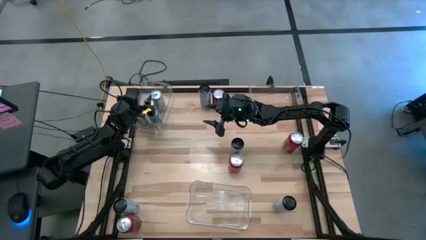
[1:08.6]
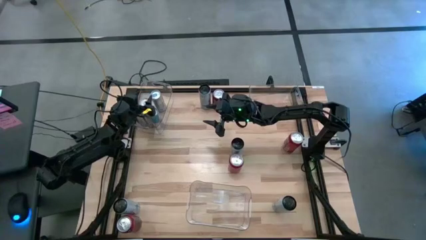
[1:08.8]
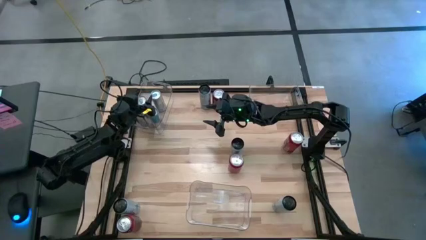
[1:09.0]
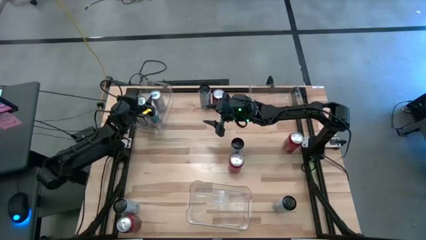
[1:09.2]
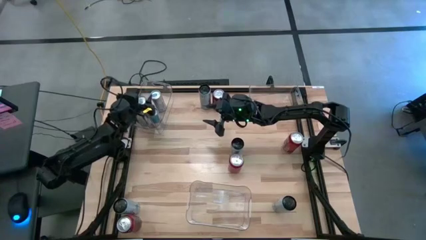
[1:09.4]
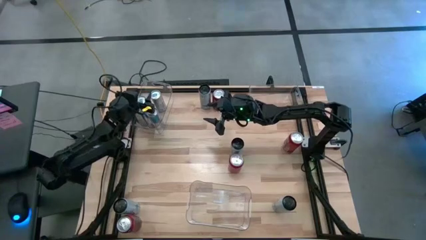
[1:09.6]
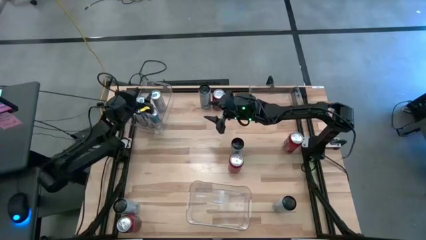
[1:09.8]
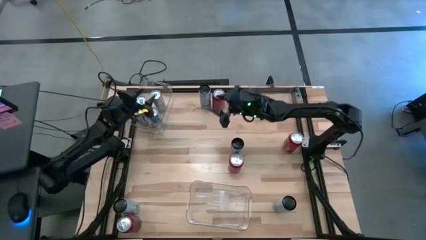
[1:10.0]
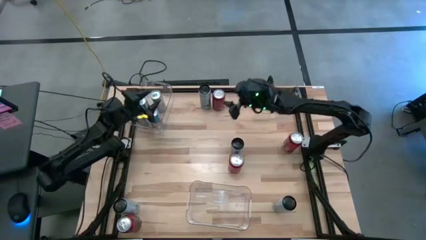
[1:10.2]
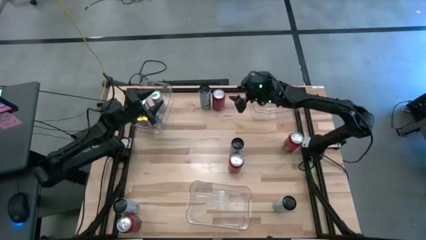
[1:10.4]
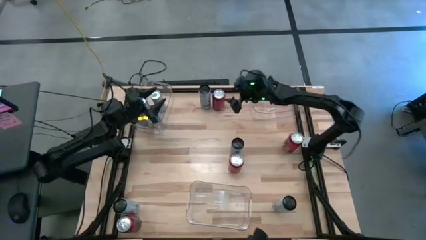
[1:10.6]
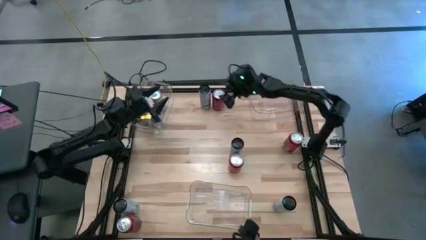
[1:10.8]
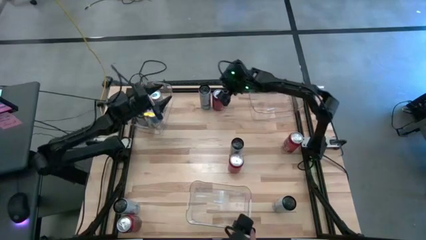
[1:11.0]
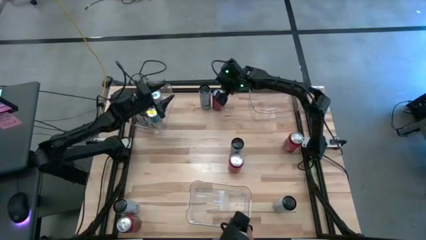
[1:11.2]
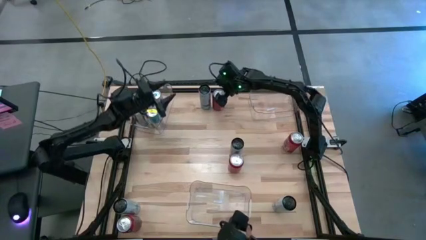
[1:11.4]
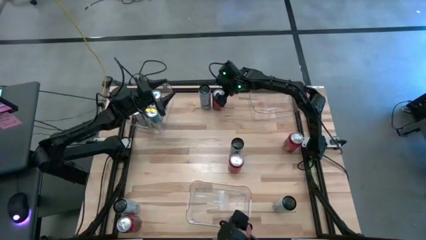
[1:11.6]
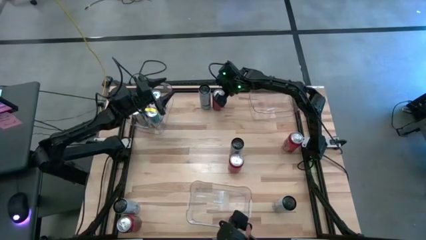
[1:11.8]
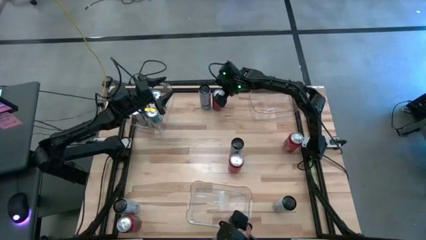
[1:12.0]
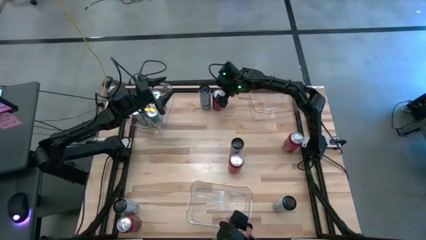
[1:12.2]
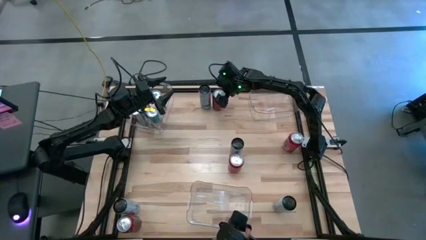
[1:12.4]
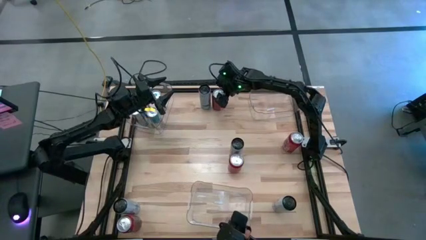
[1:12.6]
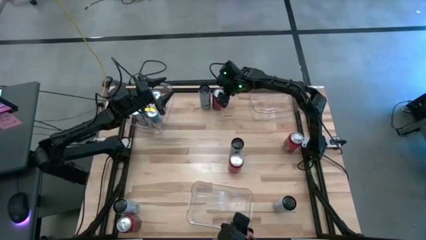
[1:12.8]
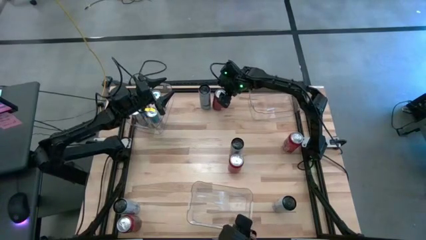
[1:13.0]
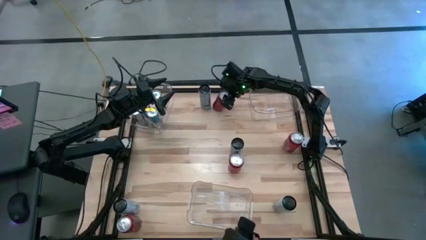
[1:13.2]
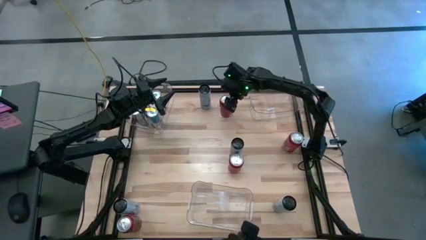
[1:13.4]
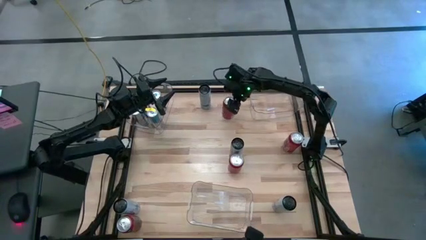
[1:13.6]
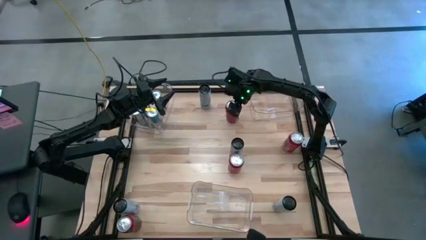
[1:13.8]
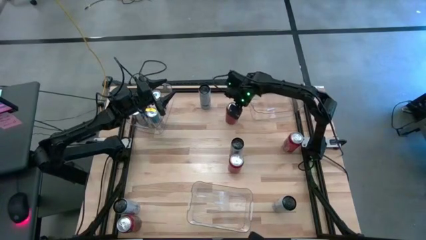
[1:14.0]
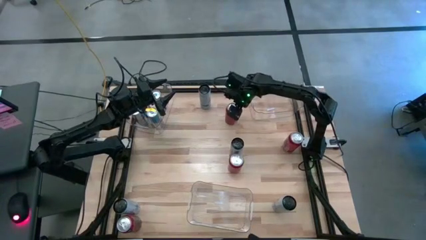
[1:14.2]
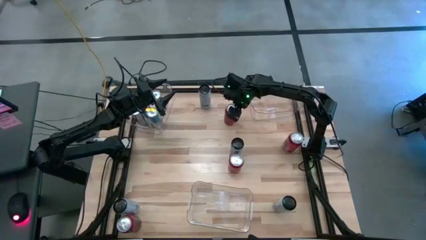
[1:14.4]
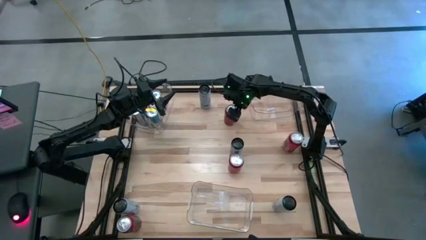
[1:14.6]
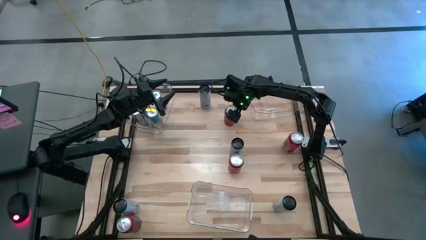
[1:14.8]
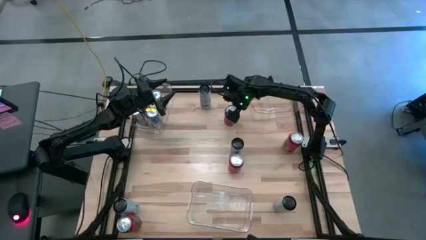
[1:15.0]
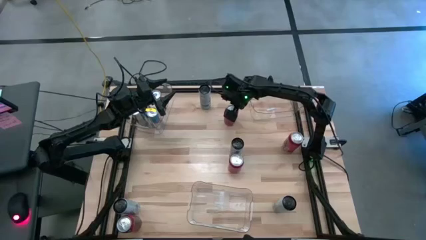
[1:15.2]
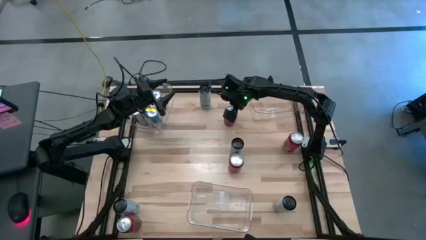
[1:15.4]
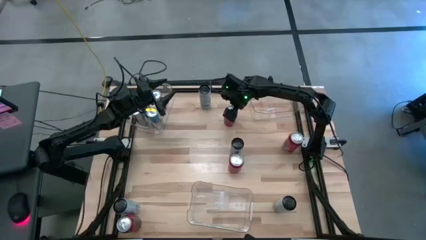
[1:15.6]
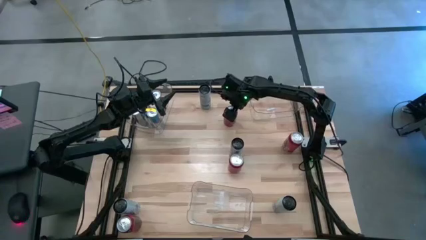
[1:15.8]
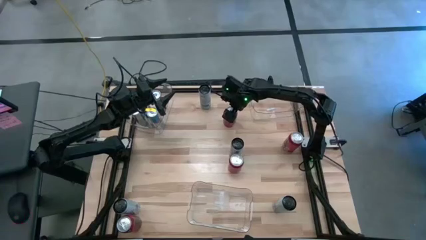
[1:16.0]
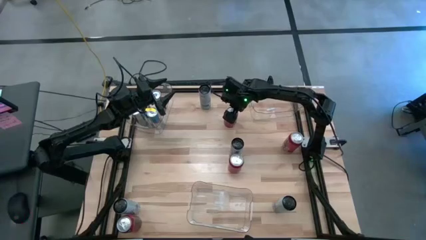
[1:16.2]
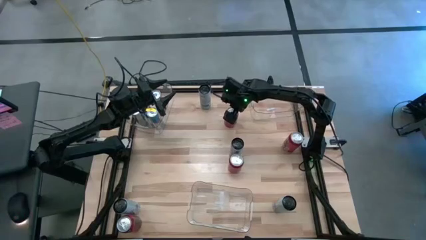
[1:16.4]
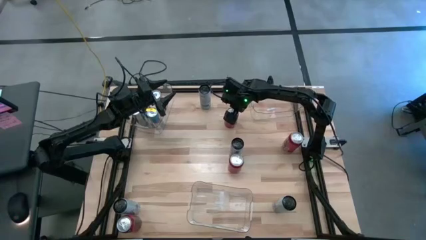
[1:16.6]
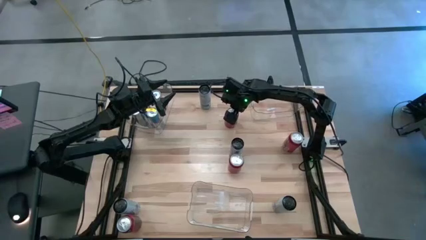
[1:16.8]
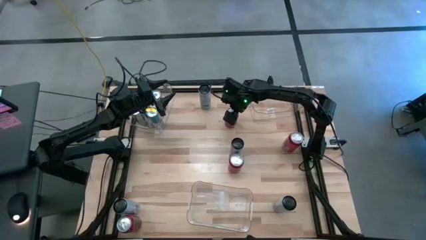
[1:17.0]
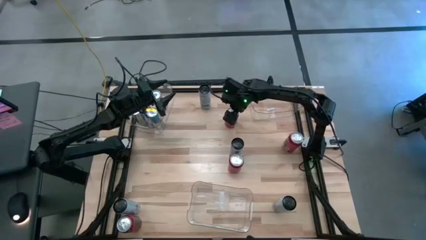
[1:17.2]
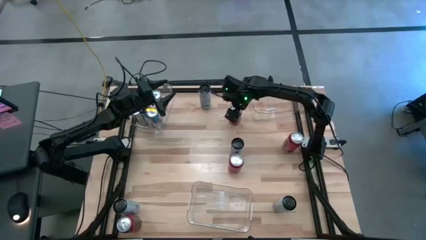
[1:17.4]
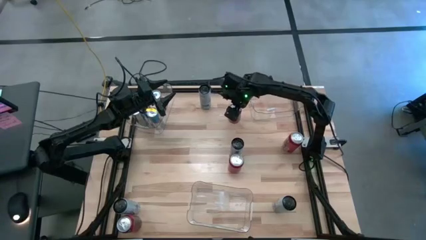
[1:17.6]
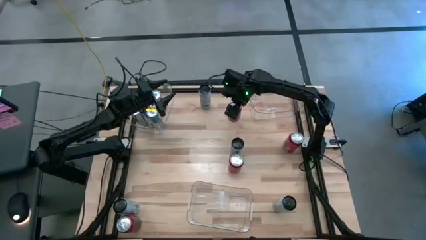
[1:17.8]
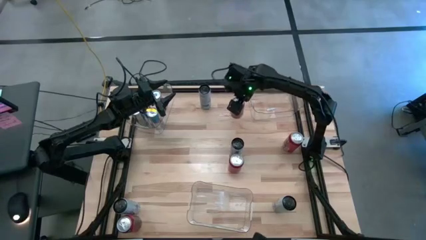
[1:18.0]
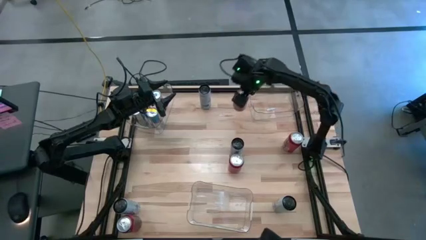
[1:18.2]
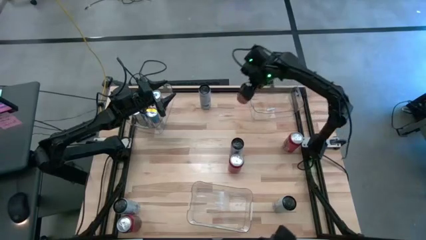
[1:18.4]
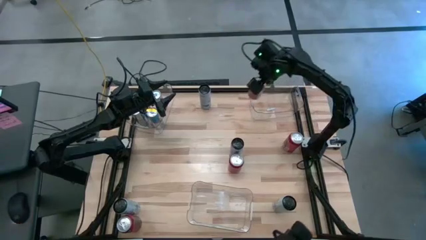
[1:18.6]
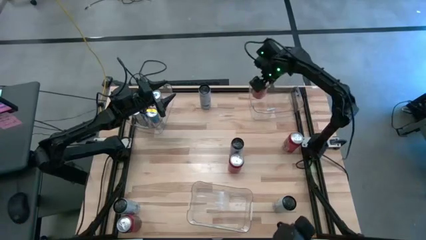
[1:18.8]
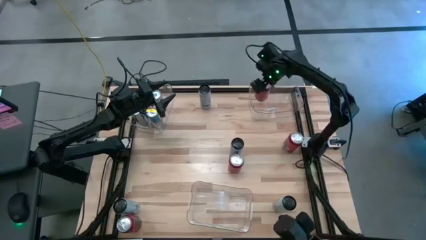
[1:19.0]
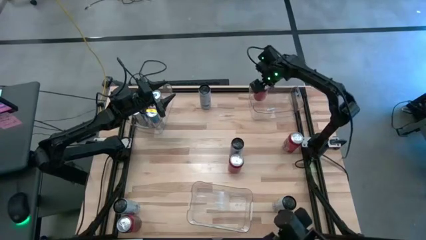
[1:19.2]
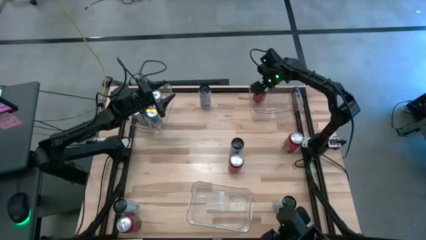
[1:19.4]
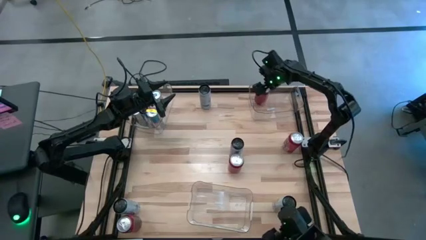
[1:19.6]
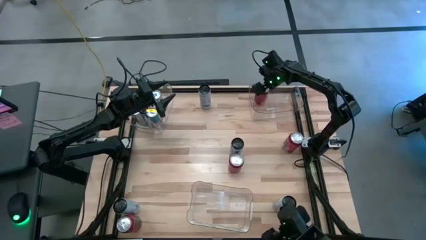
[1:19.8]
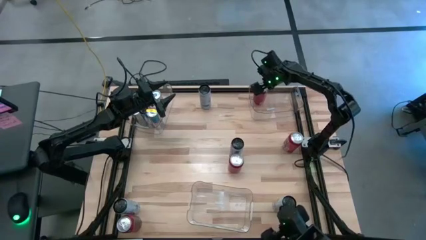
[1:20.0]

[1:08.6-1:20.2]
Task: Sort soda cans
Put the red soda can into the top right transparent bin

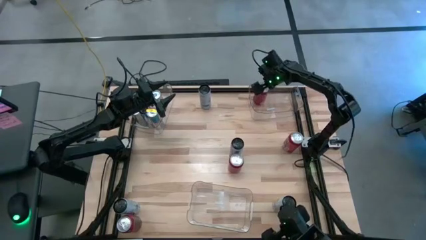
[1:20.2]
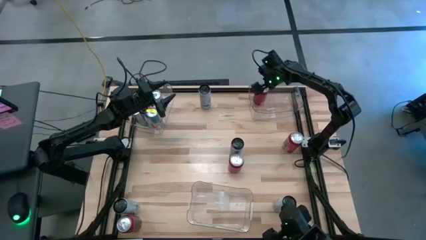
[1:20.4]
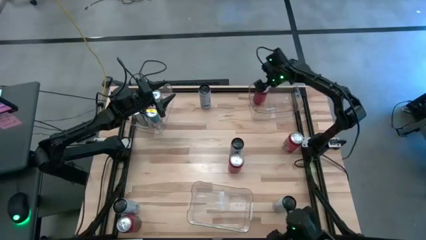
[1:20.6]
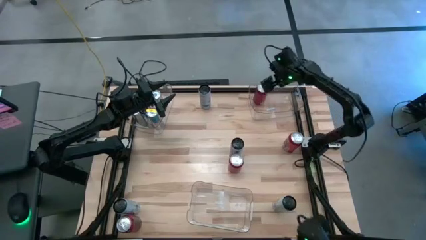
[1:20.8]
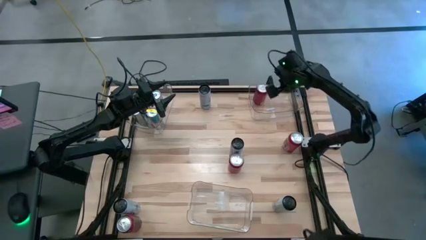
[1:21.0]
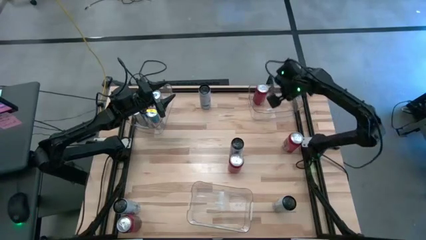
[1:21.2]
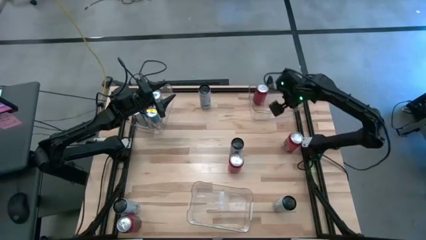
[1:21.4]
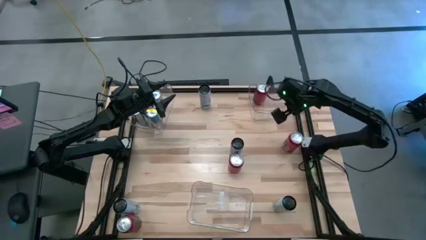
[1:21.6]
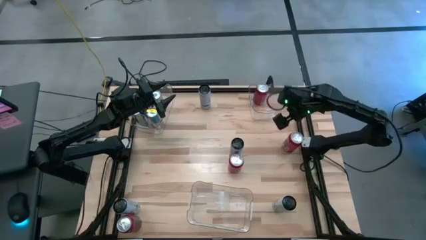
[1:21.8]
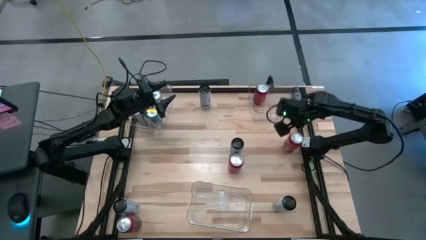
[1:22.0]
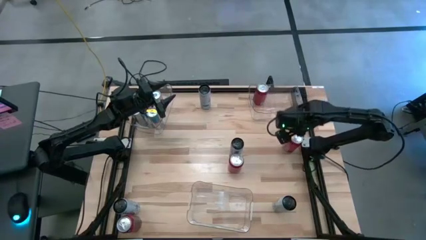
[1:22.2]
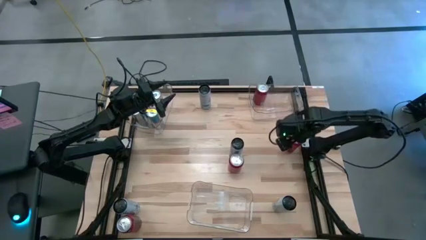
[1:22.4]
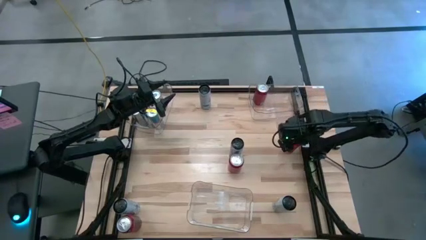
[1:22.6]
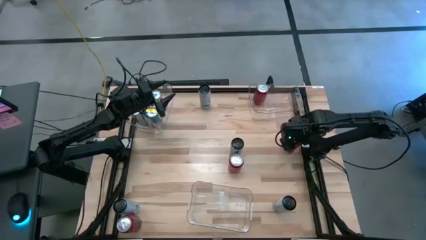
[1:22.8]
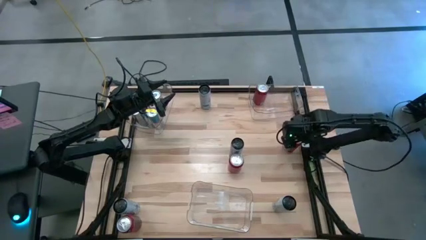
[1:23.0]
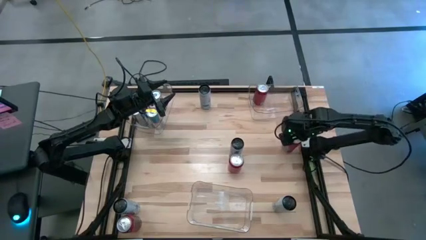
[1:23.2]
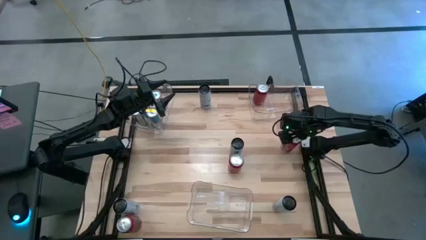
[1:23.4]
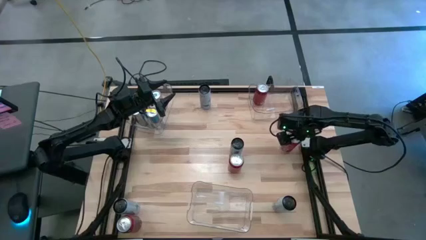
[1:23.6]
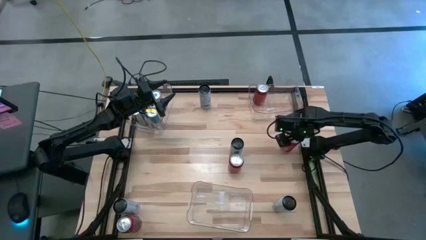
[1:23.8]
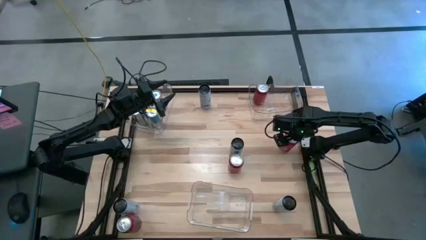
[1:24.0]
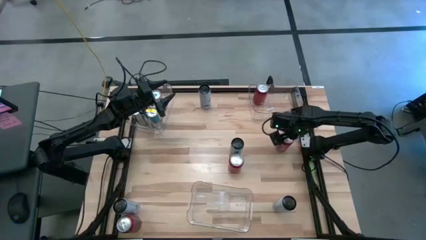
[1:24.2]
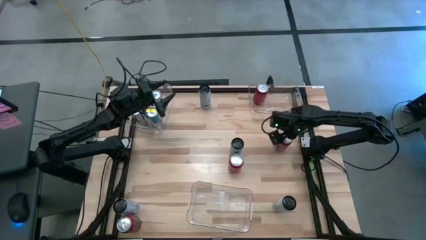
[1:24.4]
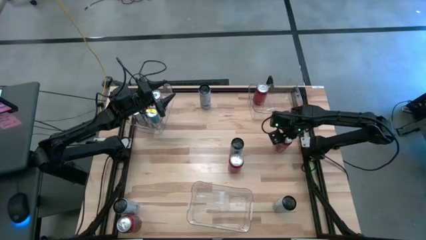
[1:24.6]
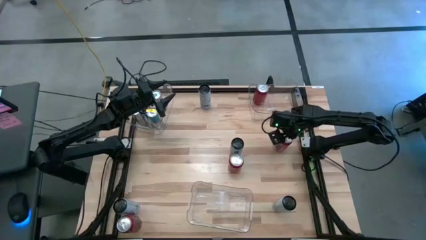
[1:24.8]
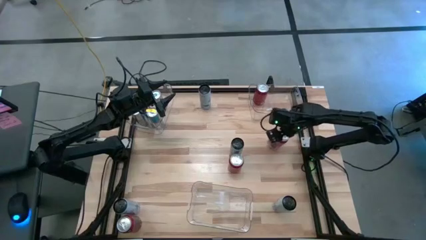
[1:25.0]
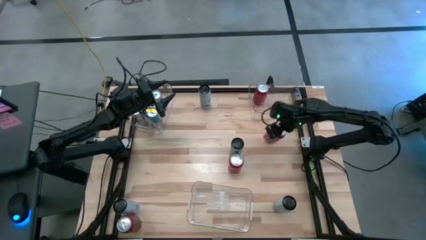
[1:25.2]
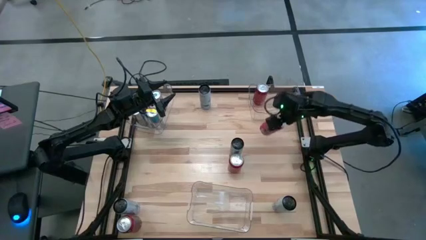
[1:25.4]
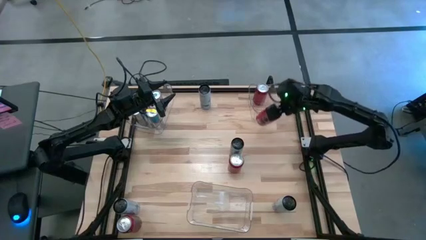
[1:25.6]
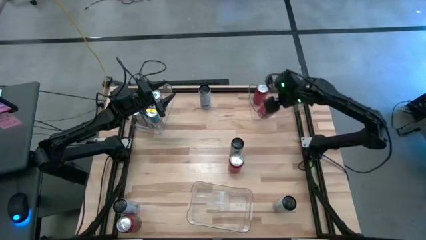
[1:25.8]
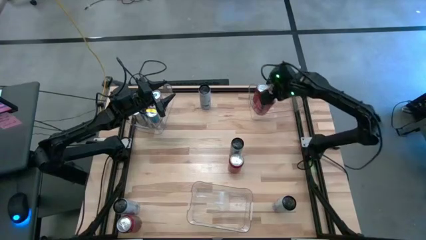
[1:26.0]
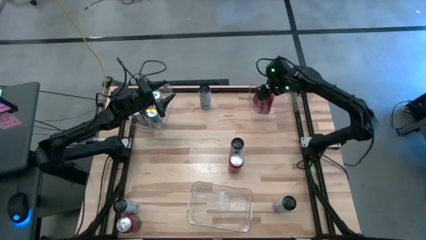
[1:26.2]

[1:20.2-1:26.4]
Put the red soda can into the top right transparent bin
